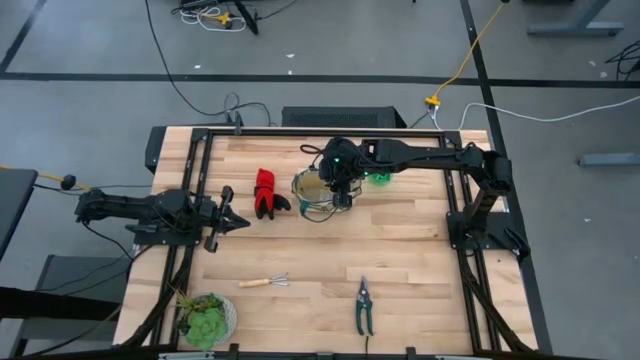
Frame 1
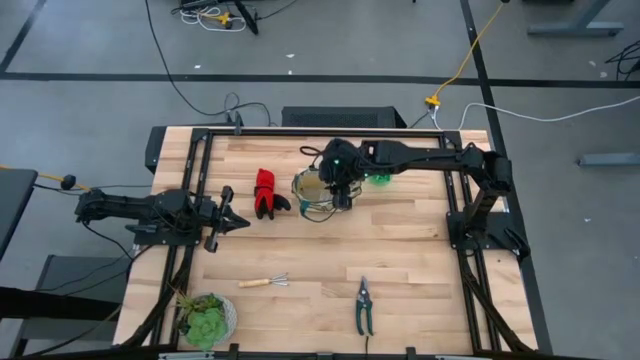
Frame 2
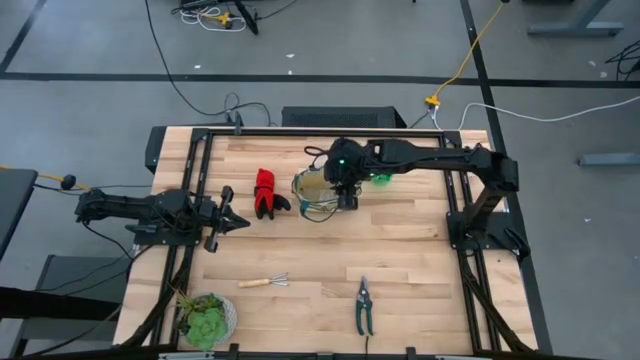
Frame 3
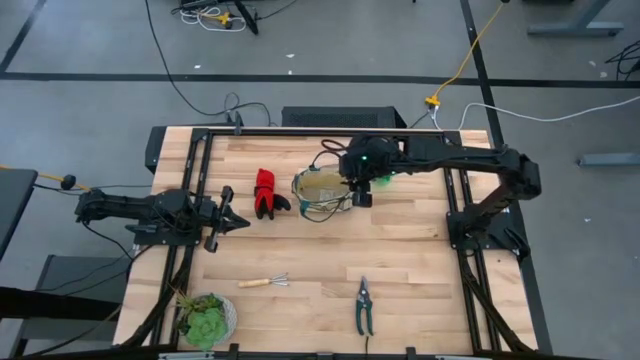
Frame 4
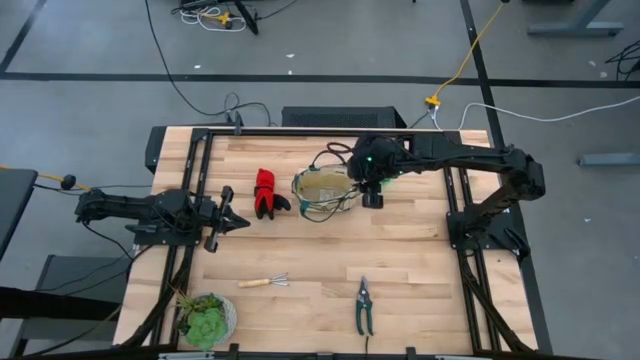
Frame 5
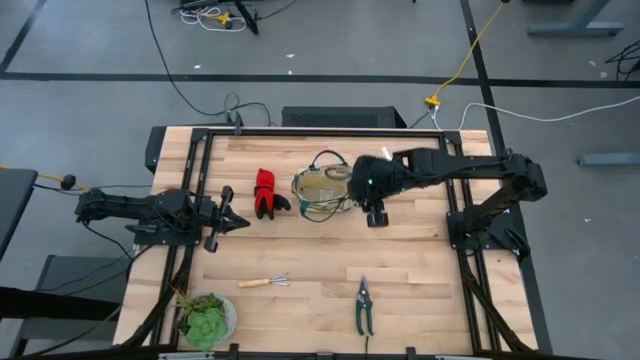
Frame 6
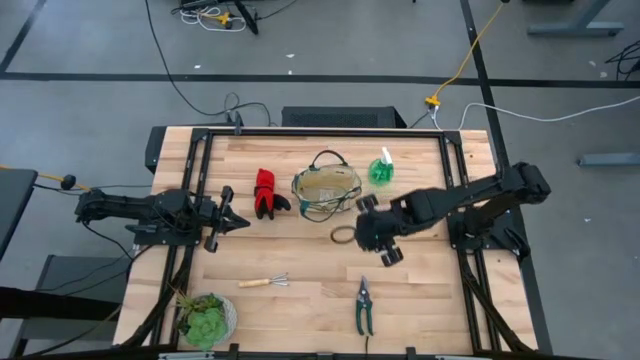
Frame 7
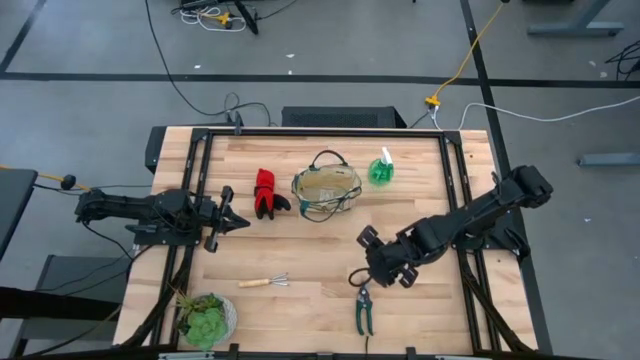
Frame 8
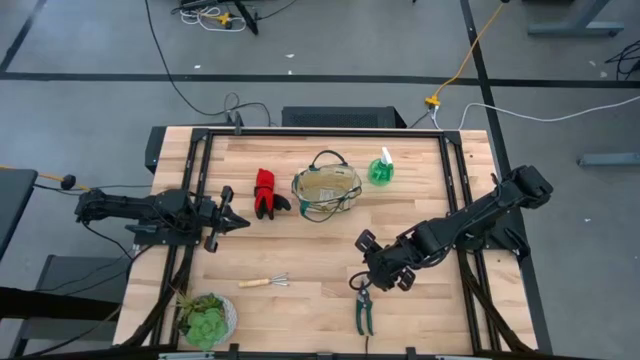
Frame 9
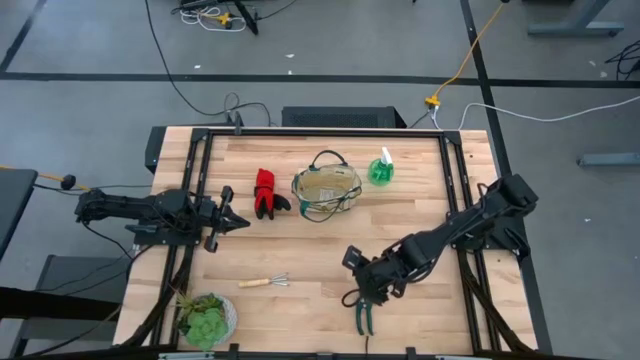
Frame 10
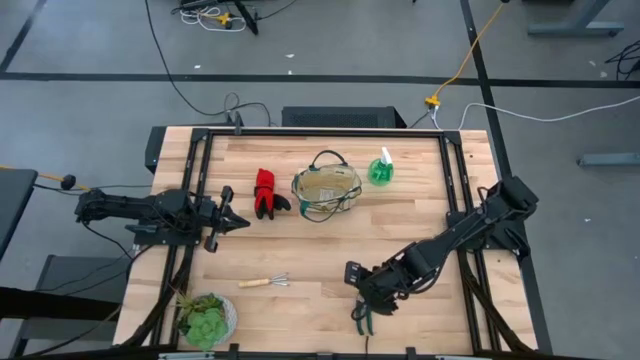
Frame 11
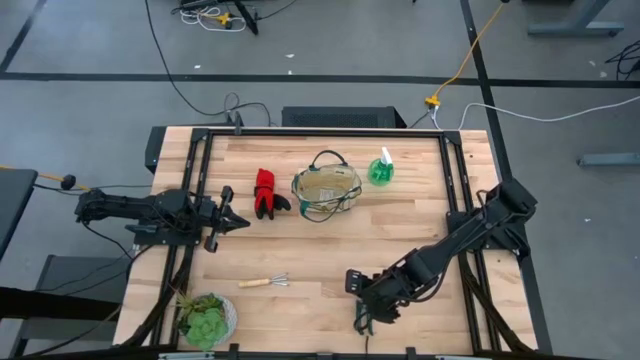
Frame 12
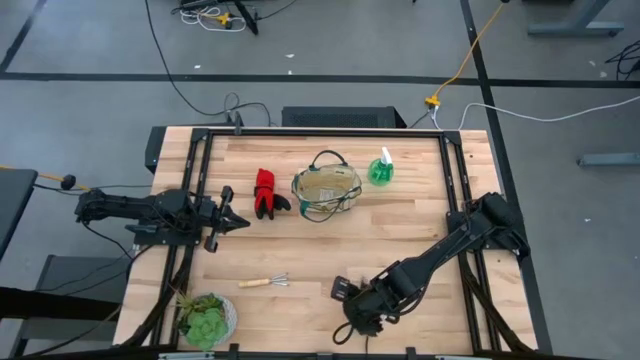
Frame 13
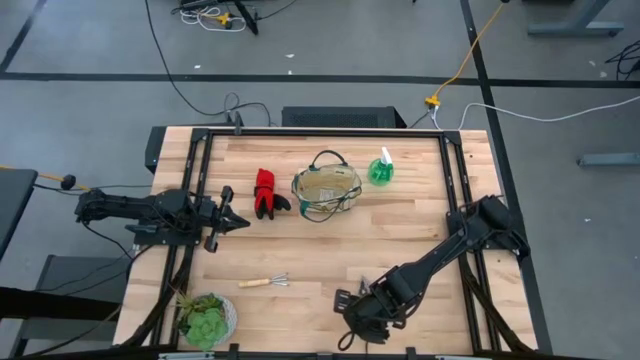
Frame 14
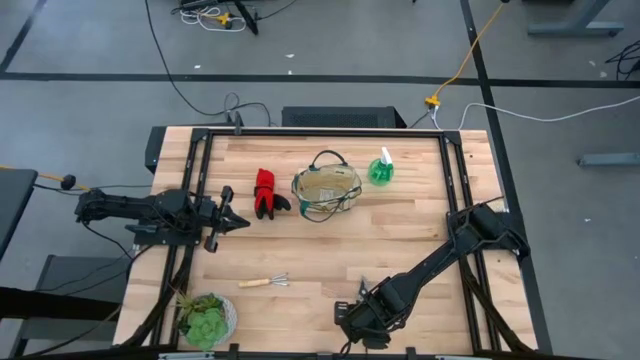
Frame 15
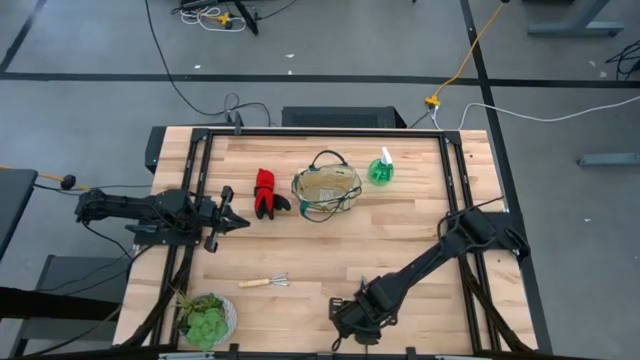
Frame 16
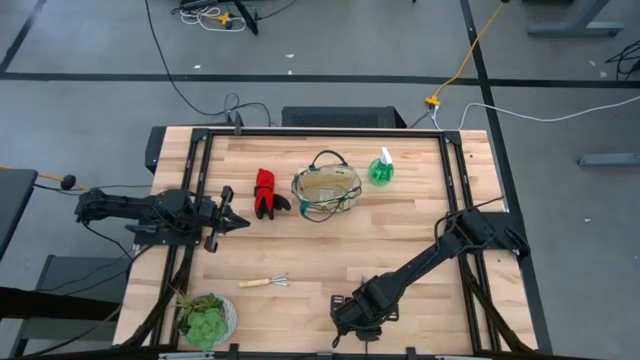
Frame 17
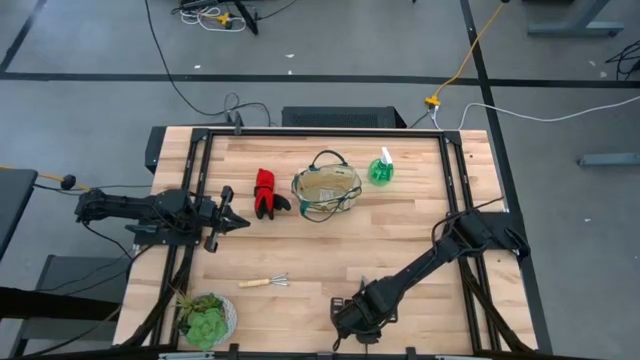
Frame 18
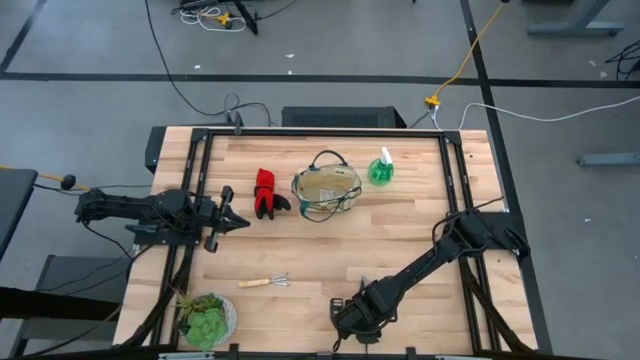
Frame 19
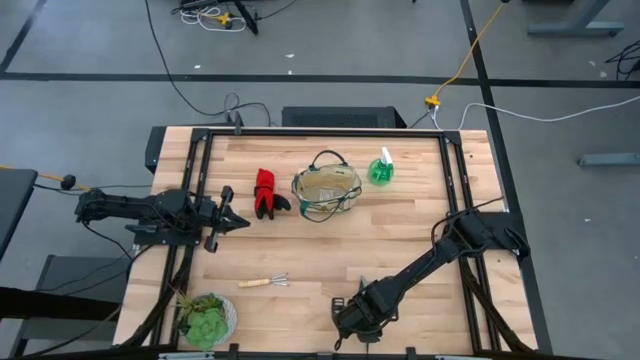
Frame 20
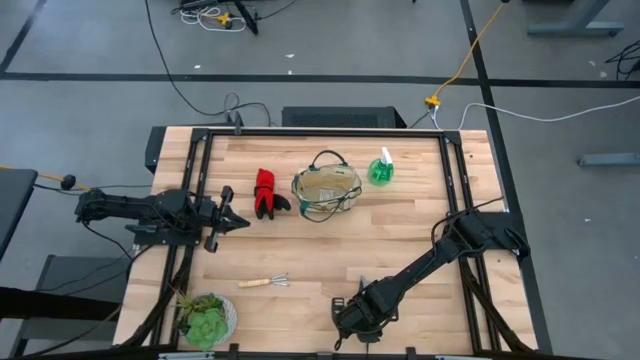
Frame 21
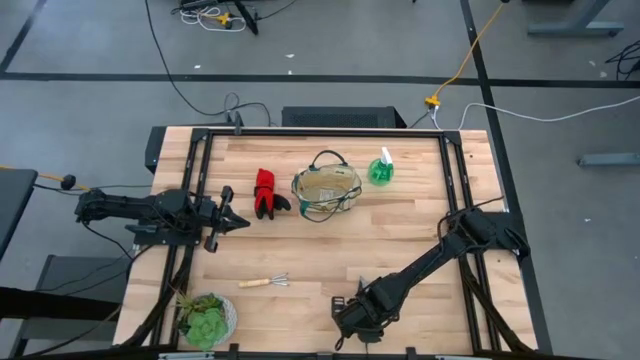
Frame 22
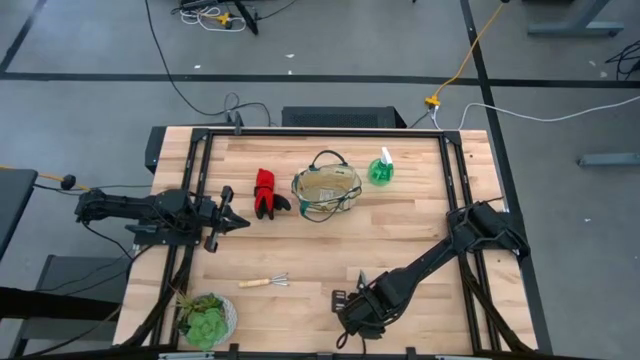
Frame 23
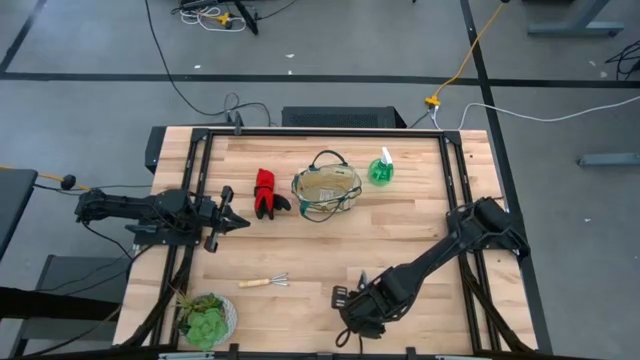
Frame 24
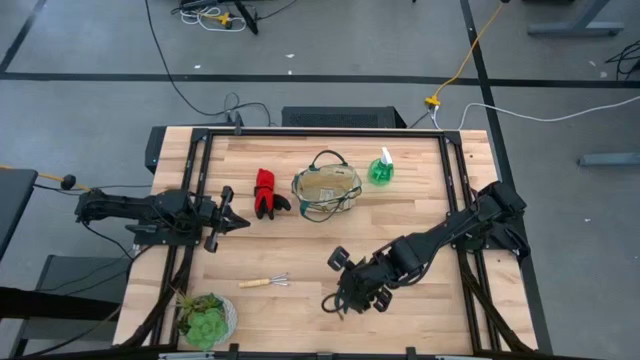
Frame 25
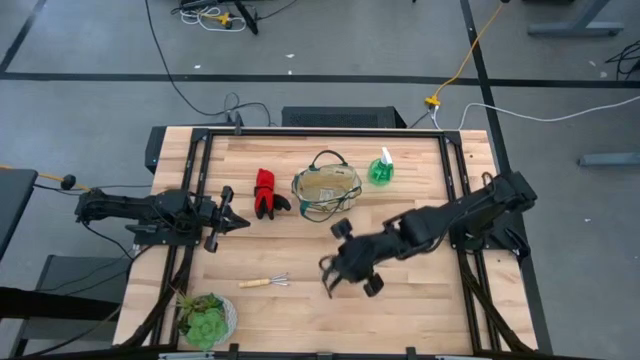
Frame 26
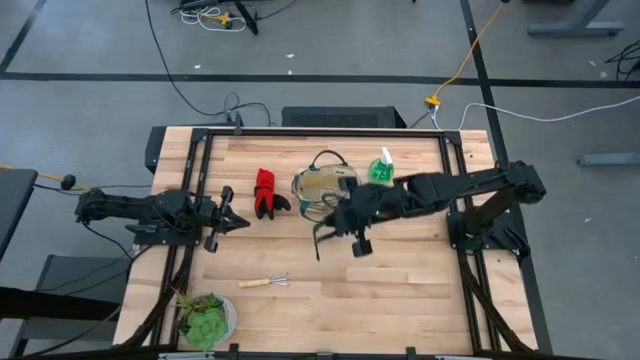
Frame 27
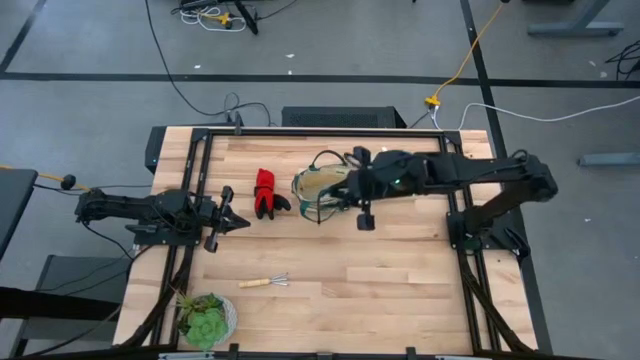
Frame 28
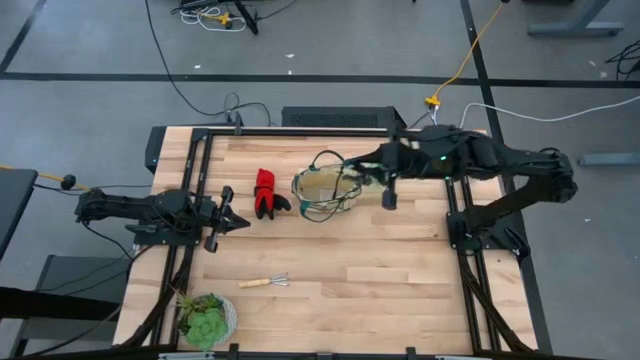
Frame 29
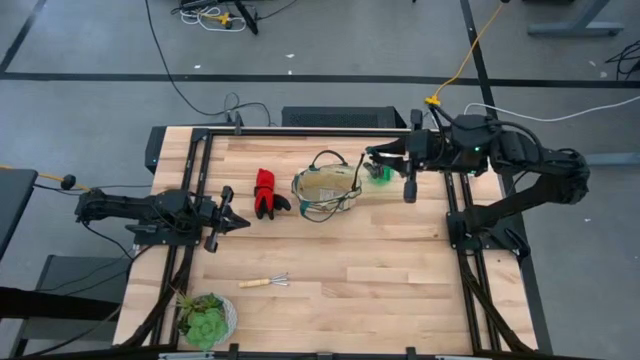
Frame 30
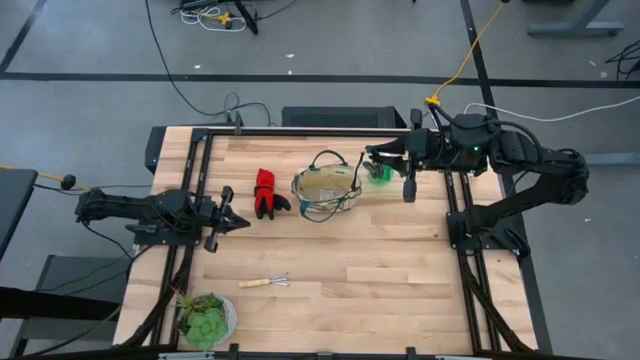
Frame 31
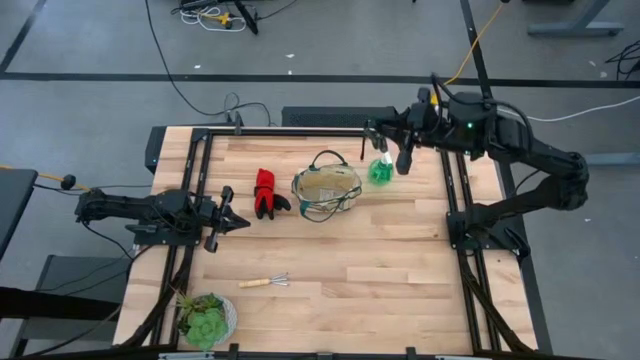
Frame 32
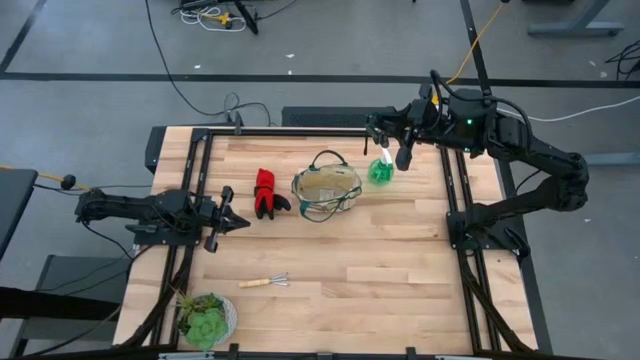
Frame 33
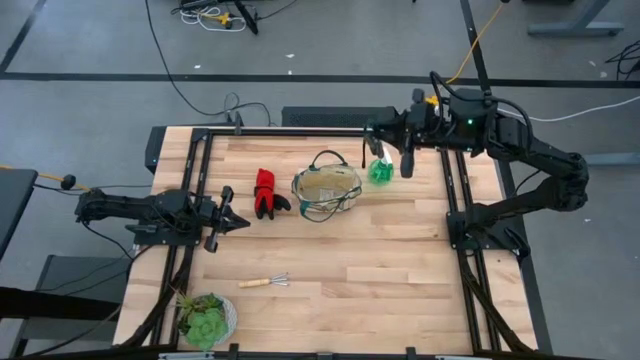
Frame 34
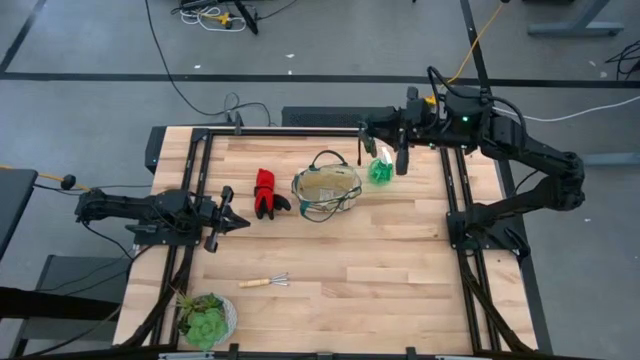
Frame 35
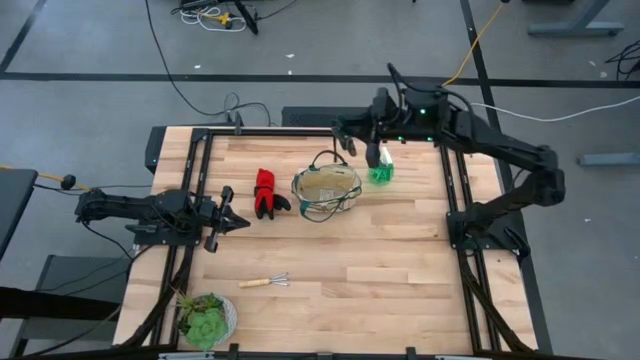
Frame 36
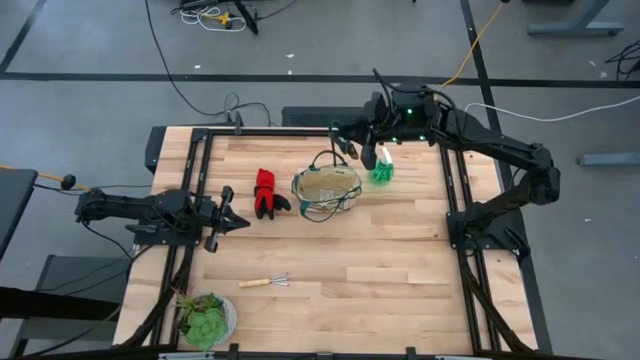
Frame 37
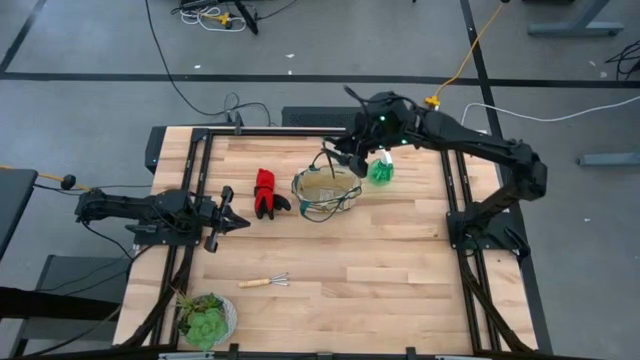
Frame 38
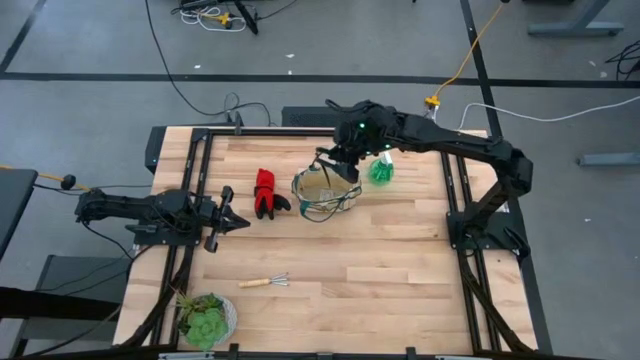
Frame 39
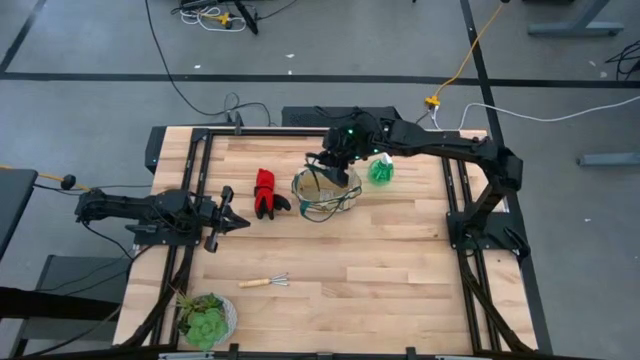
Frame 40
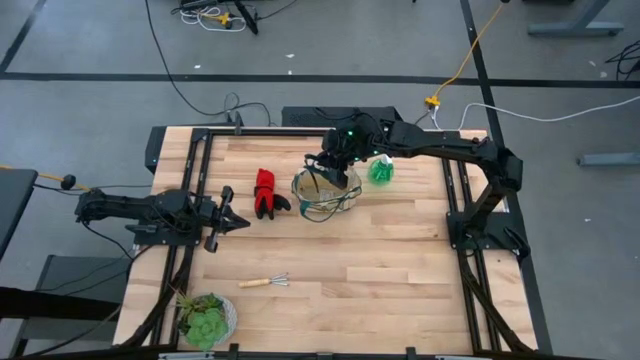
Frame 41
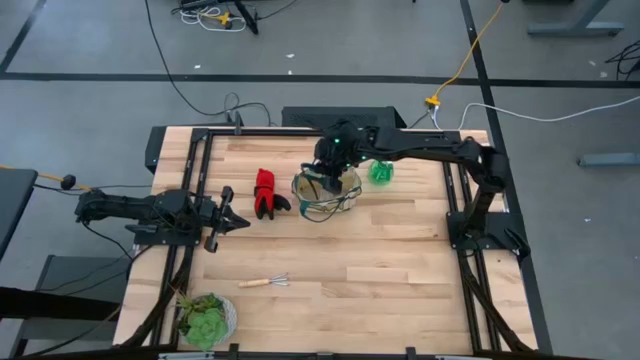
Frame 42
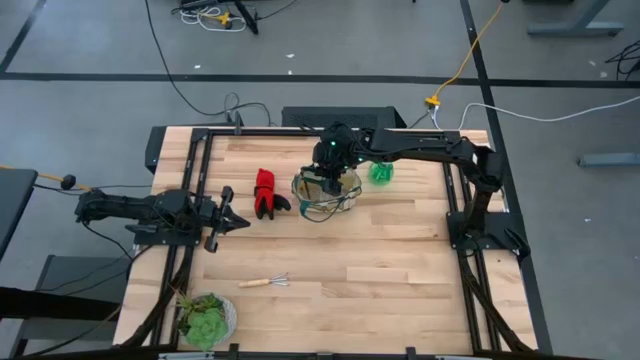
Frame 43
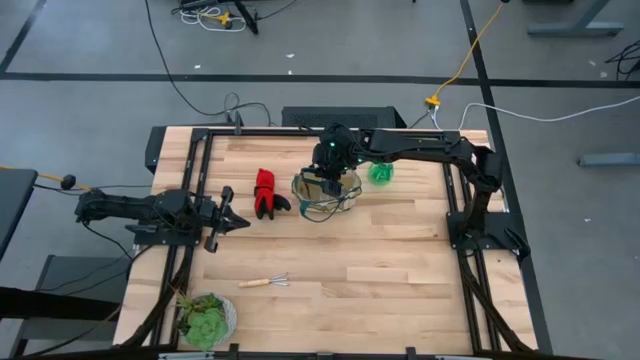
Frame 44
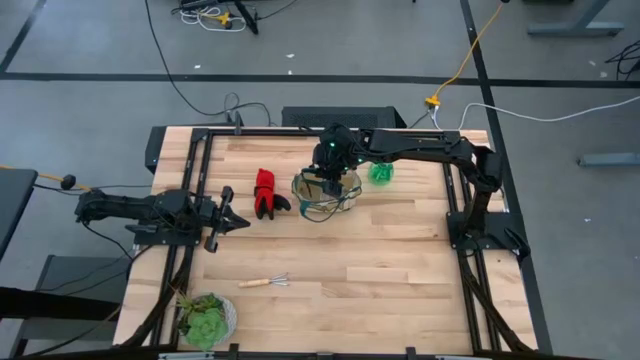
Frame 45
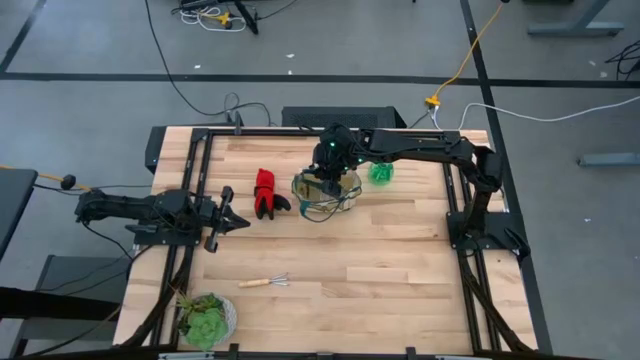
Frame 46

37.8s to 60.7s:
Task: Pick & Place Garden tools in Gardening bag
Put the green shear scissors into the gardening bag
